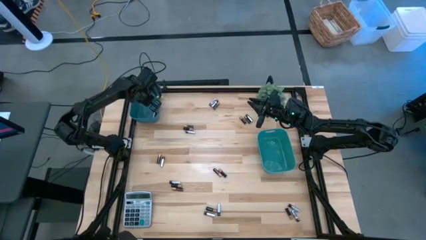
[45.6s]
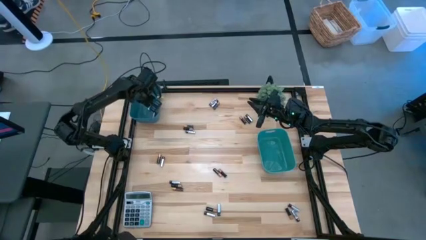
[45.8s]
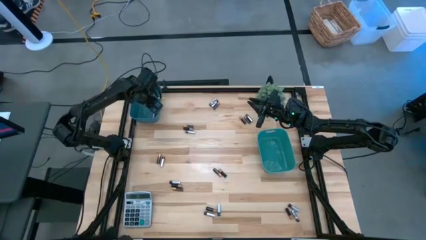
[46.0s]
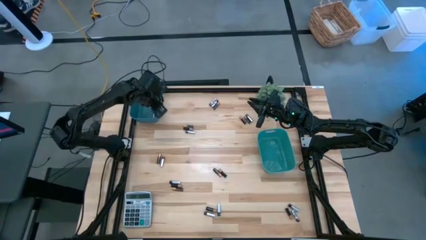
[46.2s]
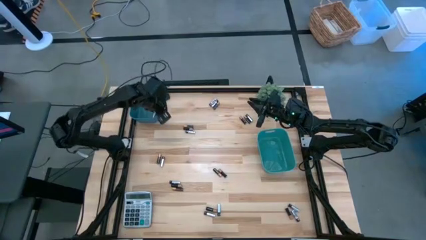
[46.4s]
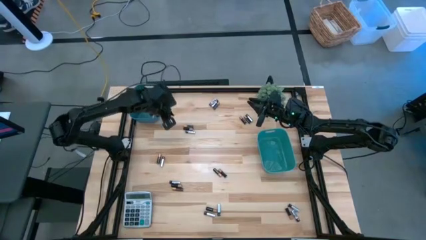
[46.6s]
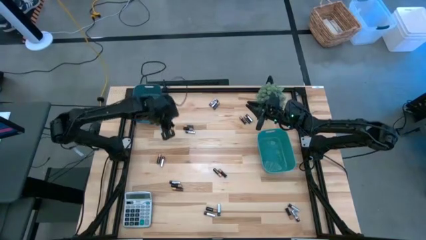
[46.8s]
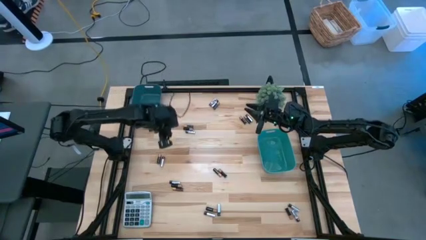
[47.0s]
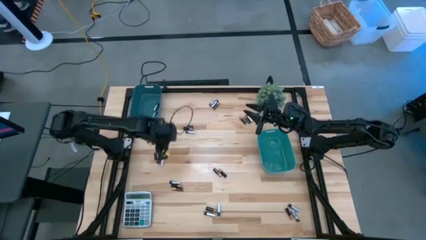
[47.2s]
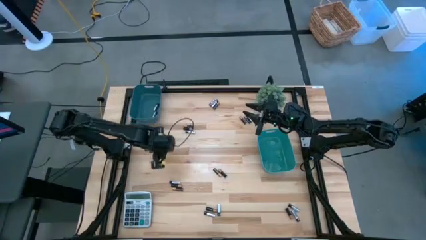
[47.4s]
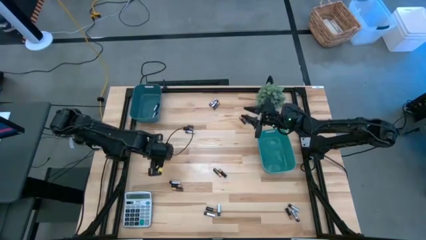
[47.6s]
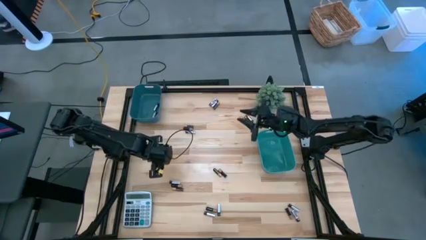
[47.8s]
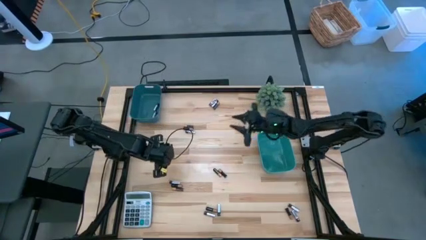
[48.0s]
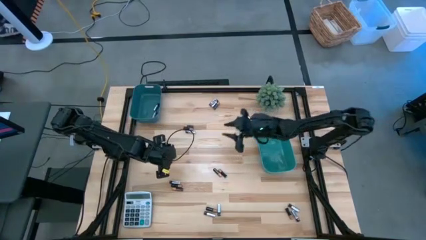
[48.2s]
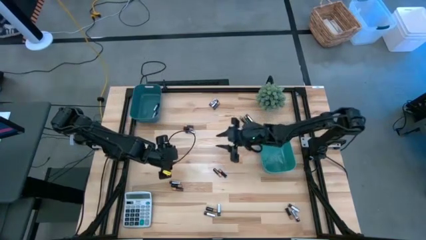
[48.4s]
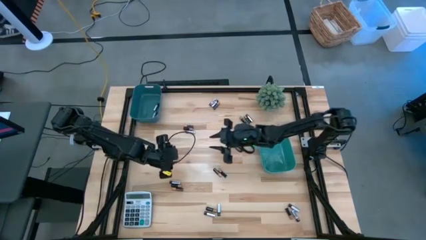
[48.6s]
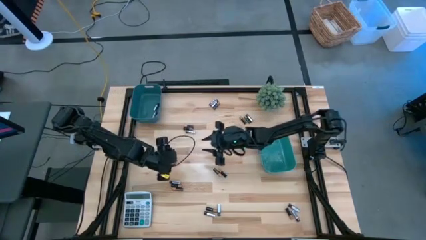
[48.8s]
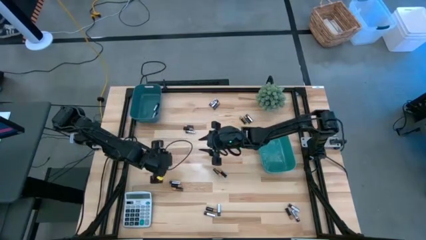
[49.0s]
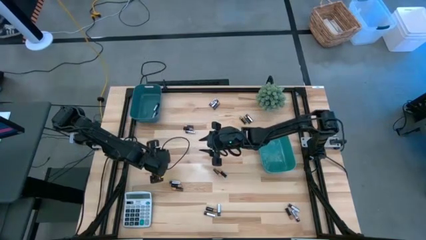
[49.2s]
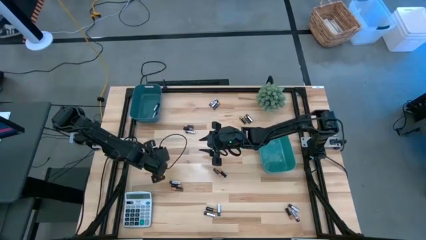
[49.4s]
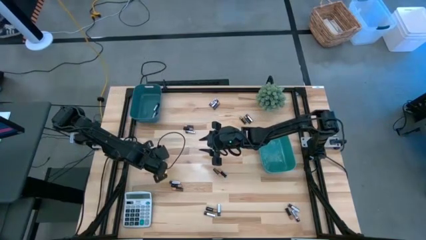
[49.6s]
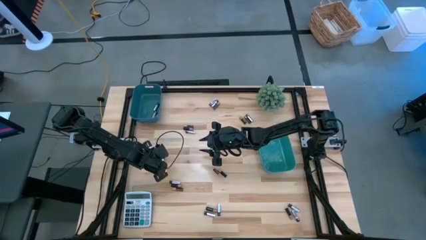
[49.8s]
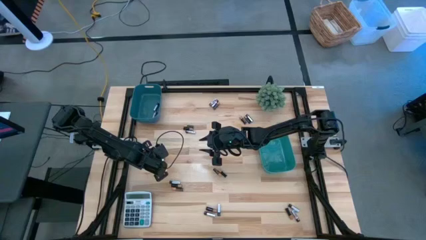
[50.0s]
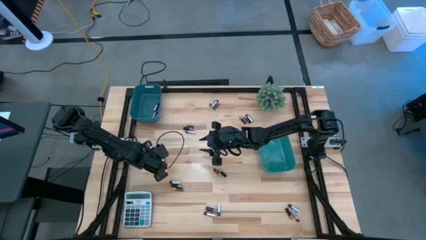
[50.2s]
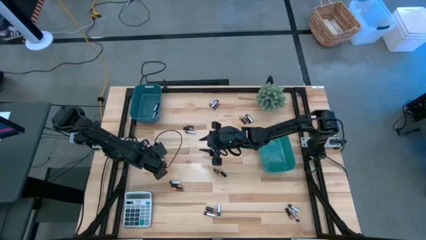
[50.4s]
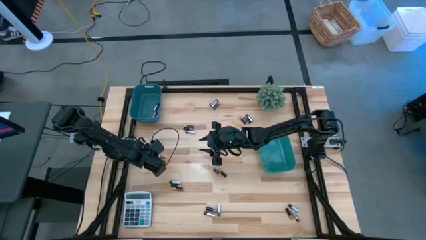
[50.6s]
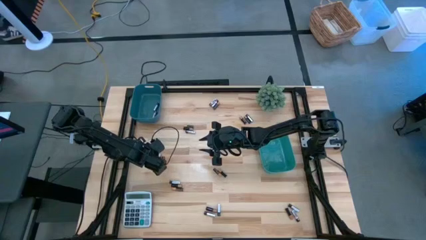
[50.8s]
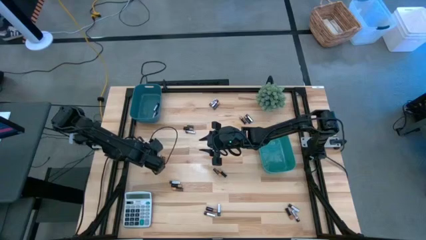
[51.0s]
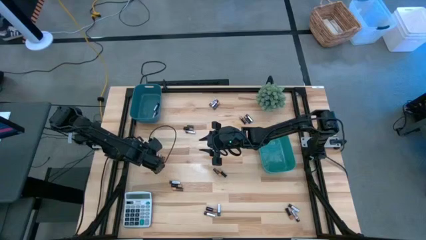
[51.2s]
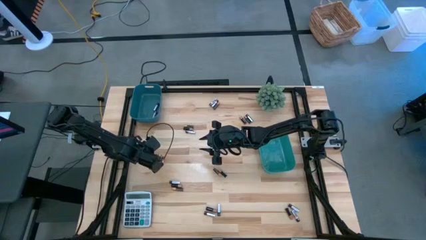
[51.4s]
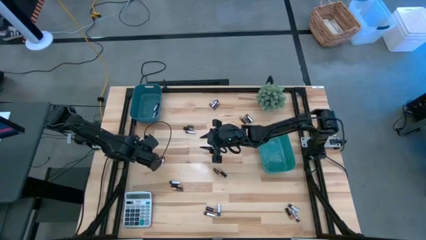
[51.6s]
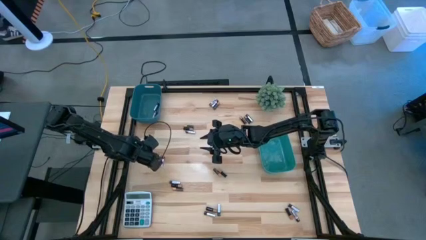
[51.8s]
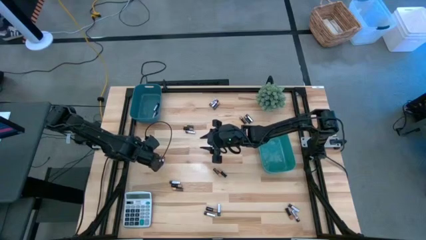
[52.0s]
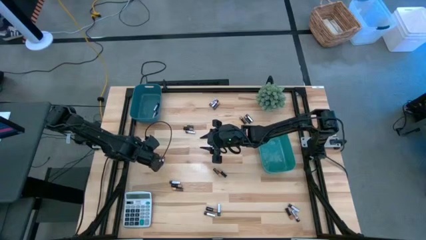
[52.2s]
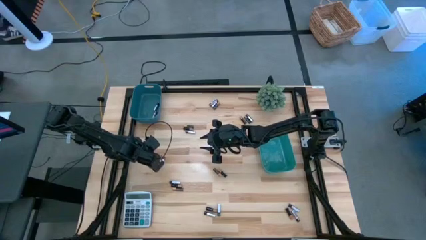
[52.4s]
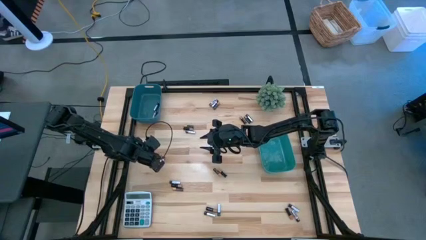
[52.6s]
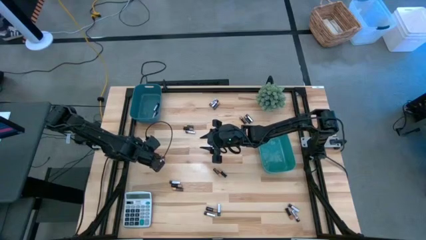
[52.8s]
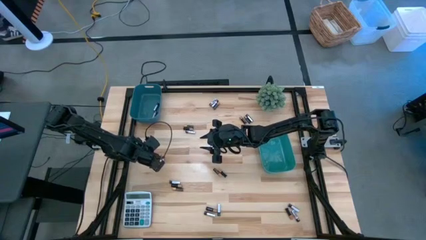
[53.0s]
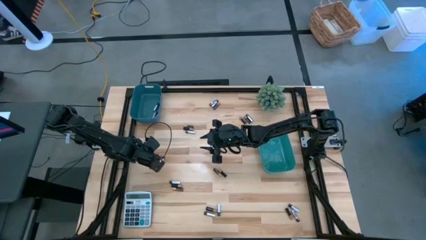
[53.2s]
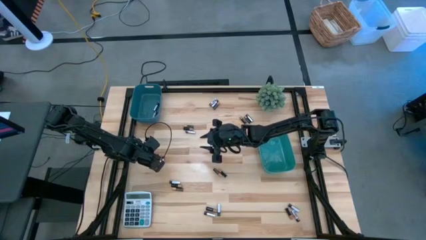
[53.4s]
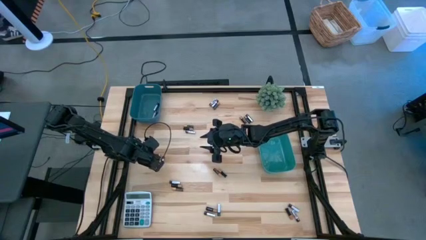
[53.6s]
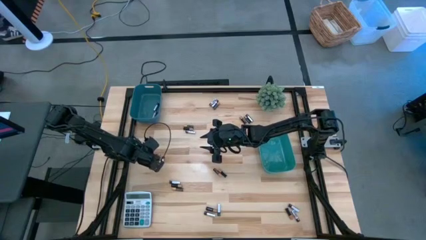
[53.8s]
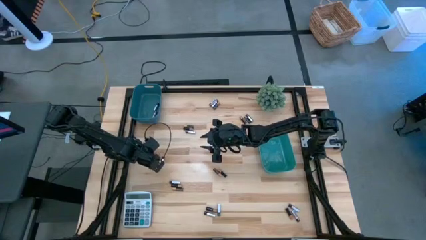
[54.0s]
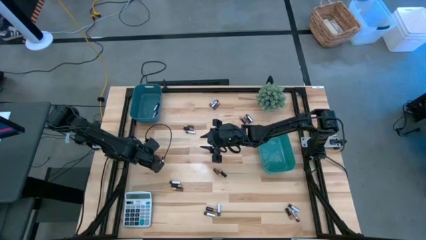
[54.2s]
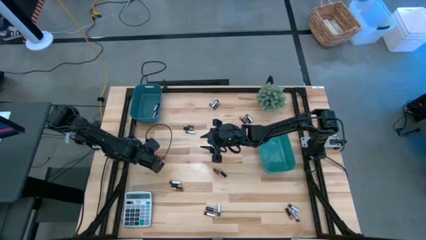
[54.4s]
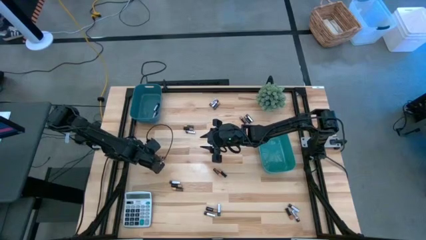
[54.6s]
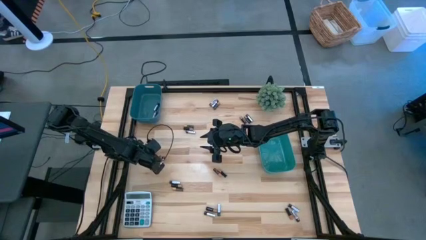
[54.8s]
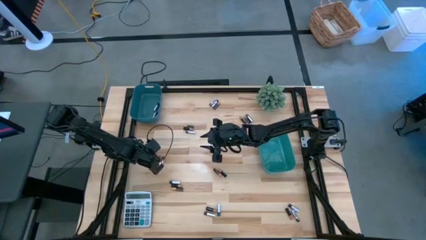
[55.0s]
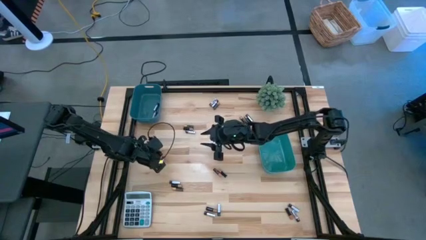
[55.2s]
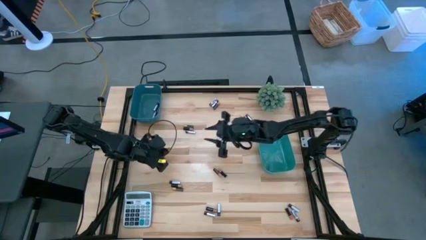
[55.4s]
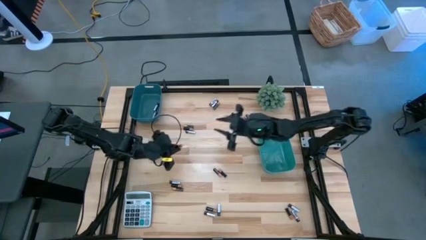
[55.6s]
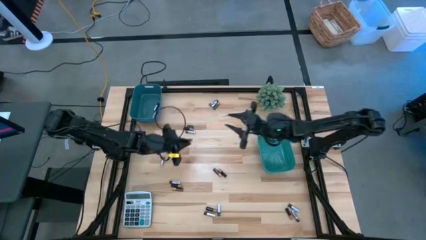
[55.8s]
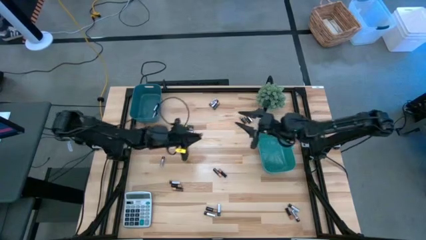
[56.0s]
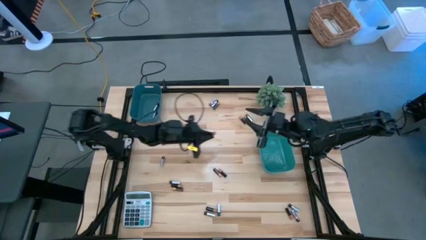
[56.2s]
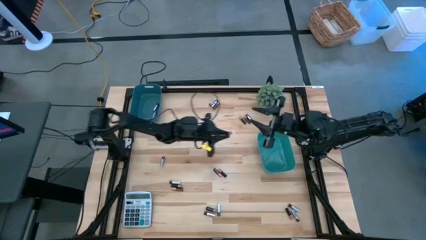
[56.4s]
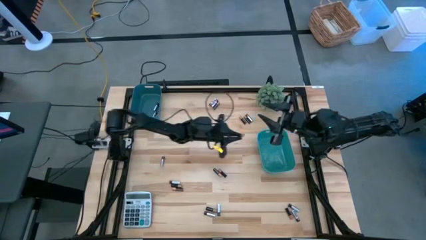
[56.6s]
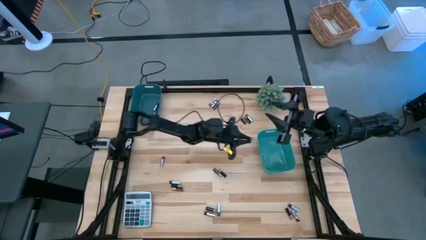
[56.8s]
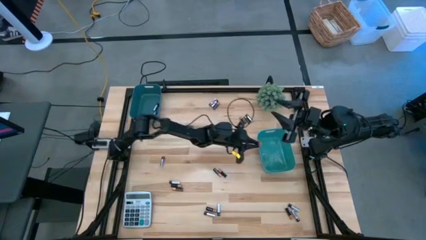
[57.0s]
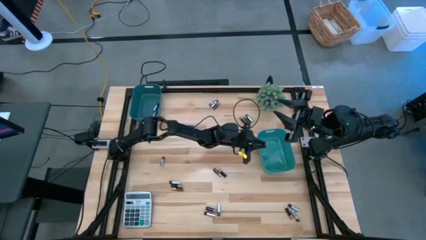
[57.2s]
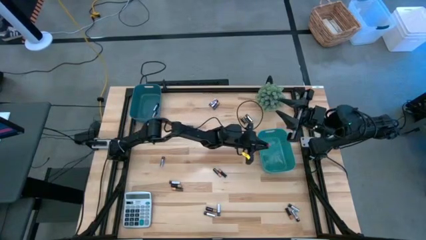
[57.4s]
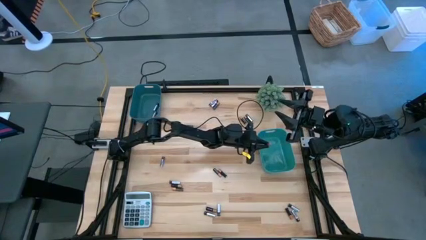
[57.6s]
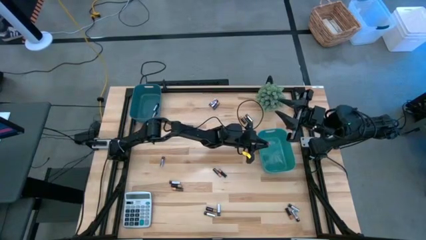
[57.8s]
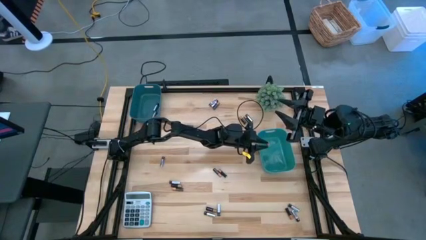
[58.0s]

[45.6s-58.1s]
Task: Sort batteries
Put the brown-block battery into the green bin

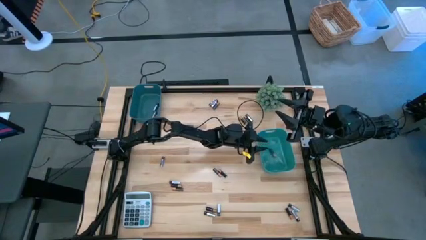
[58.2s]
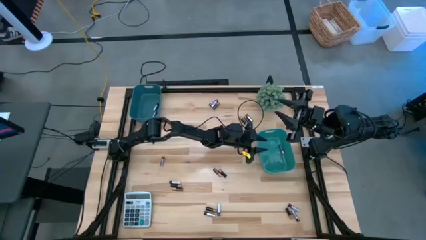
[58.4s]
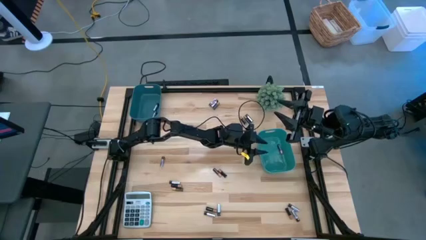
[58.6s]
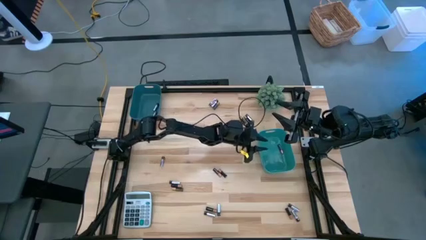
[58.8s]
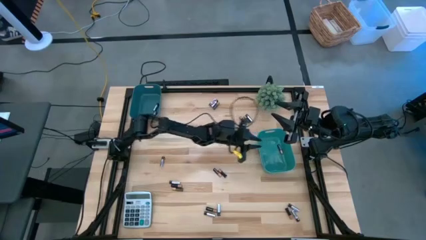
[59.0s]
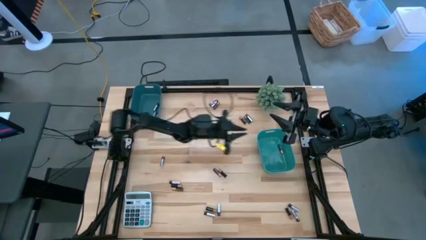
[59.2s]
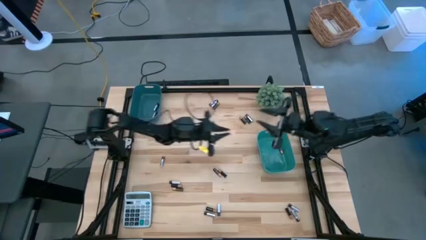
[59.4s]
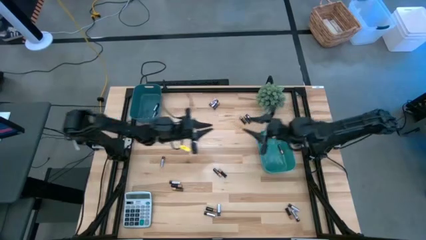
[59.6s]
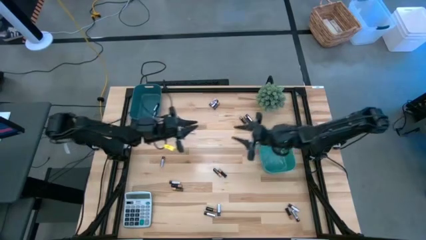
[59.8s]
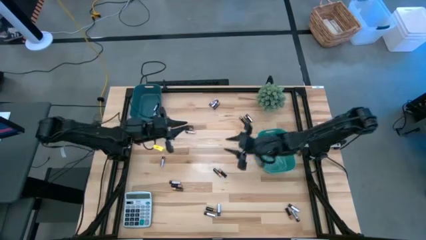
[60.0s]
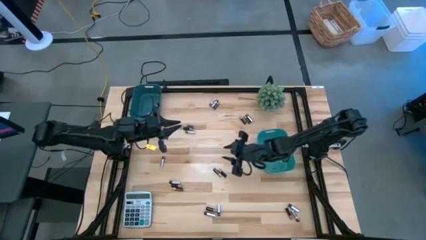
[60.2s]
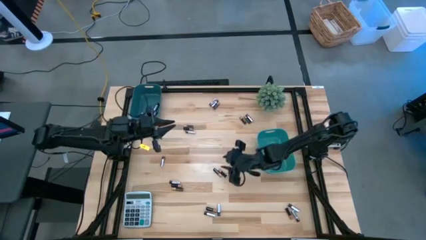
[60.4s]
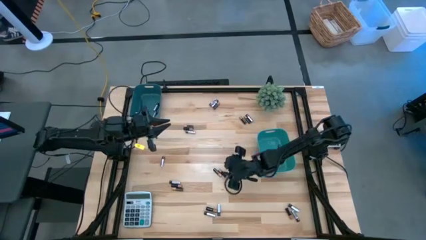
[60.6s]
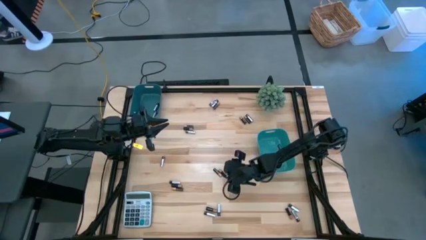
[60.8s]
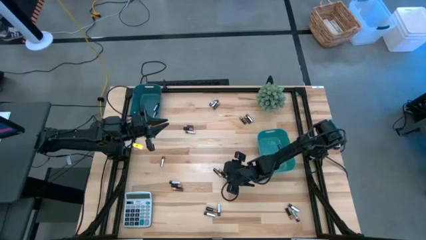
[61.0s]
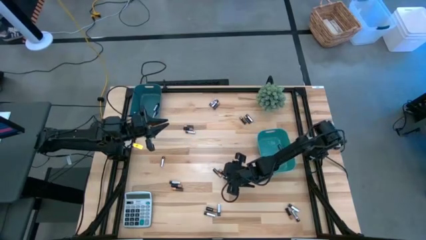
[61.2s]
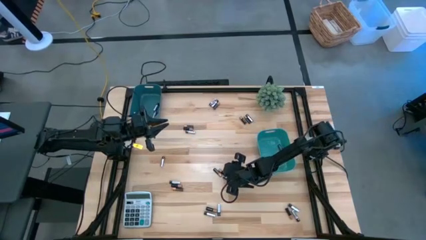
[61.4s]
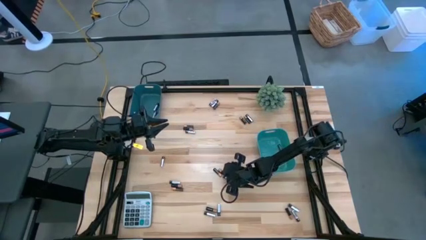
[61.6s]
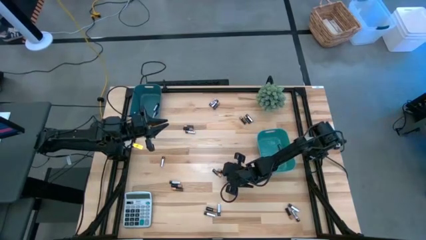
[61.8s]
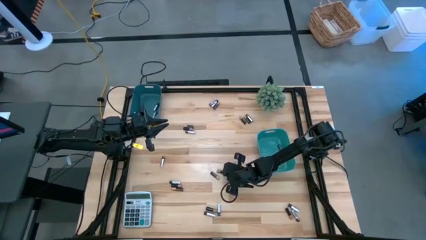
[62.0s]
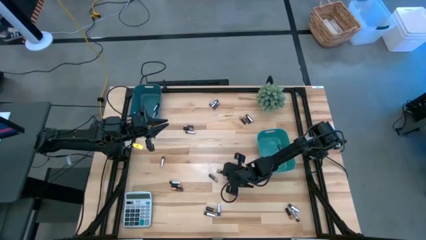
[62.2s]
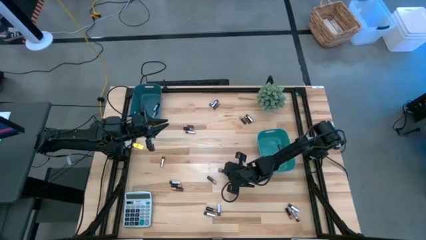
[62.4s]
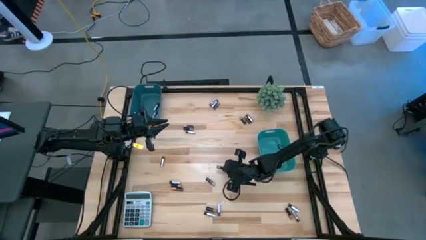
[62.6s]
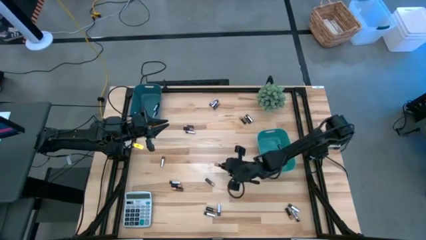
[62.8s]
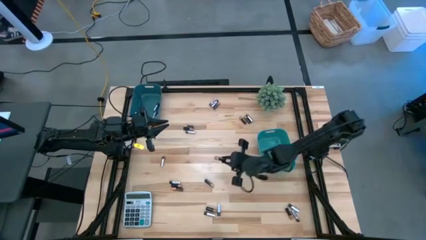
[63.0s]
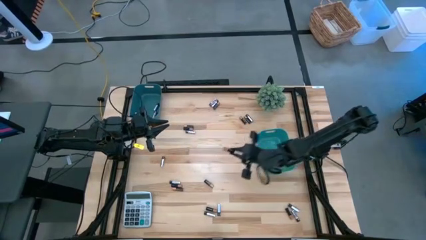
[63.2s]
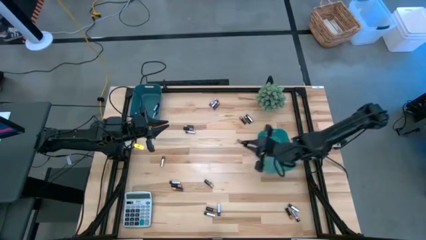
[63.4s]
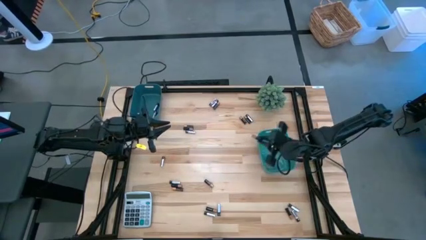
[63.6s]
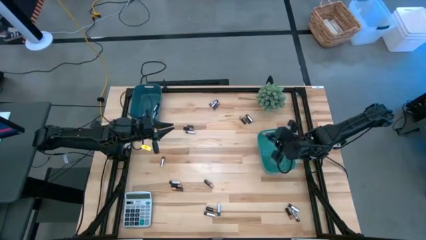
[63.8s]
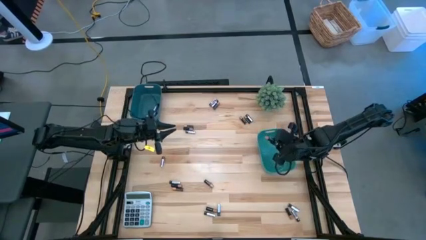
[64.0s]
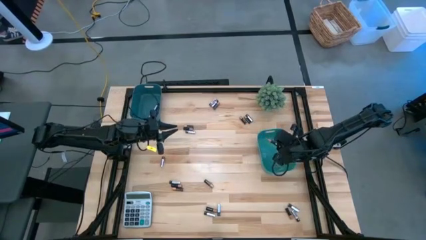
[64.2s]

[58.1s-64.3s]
Put the brown-block battery into the green bin
